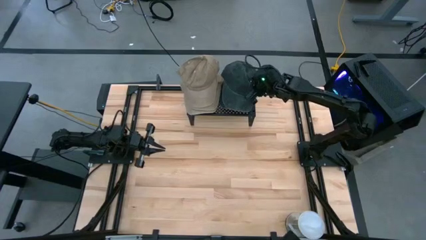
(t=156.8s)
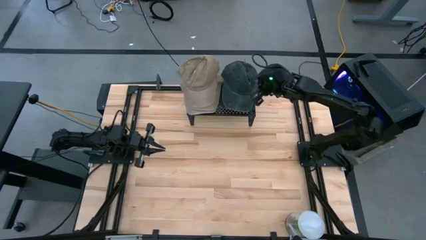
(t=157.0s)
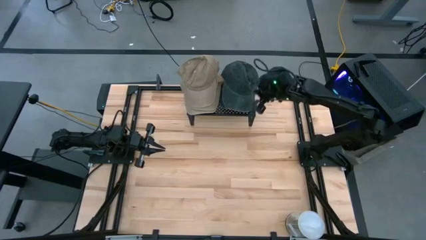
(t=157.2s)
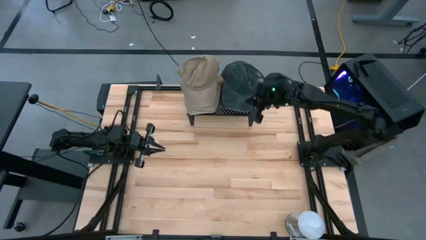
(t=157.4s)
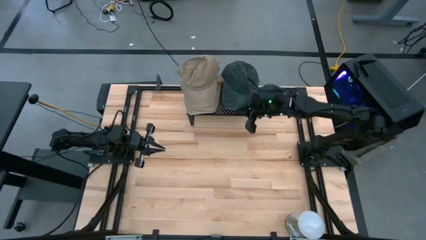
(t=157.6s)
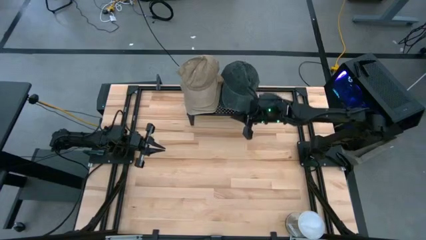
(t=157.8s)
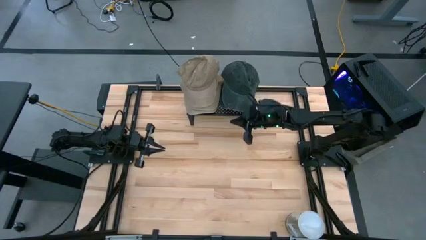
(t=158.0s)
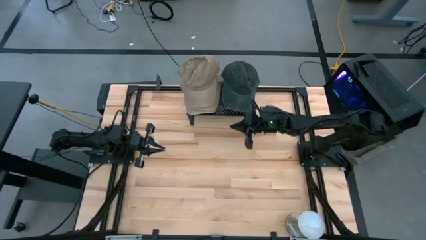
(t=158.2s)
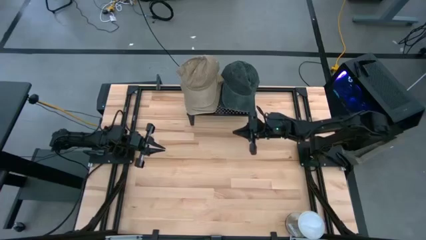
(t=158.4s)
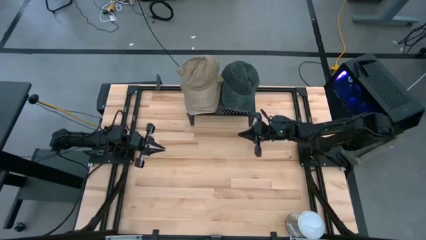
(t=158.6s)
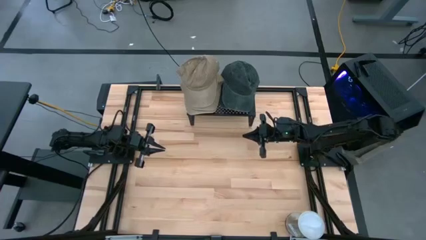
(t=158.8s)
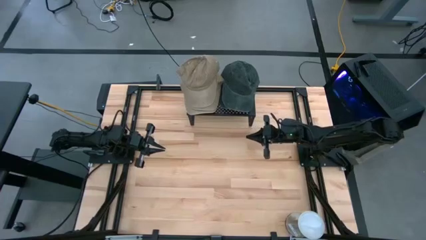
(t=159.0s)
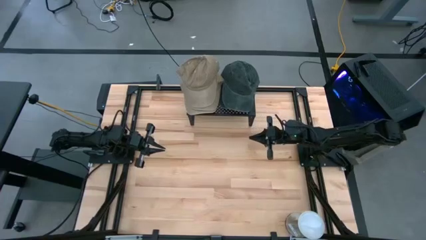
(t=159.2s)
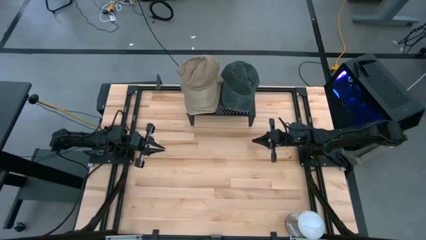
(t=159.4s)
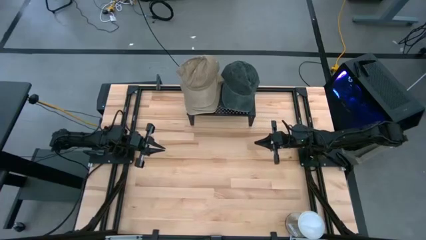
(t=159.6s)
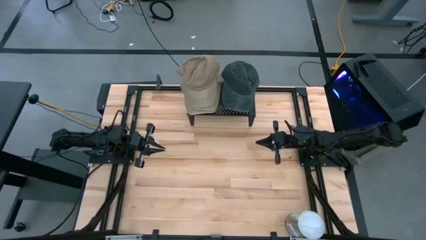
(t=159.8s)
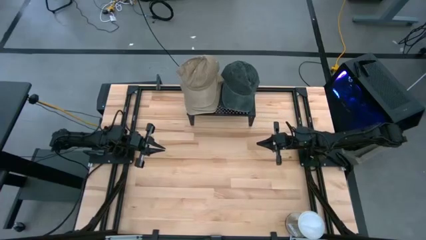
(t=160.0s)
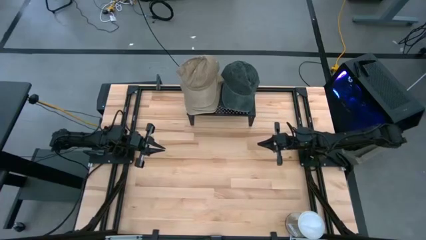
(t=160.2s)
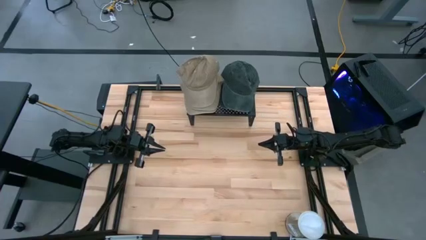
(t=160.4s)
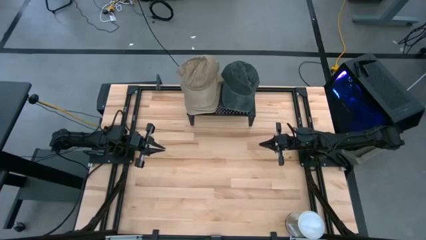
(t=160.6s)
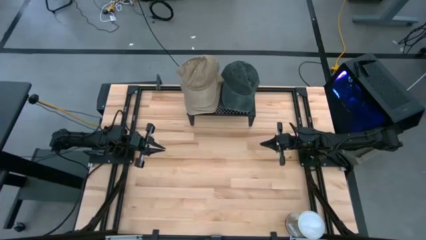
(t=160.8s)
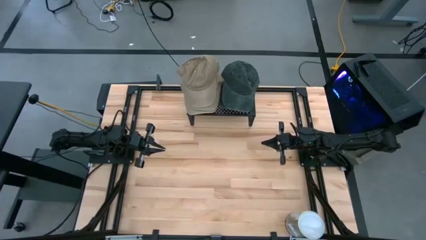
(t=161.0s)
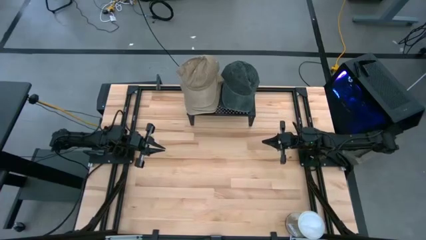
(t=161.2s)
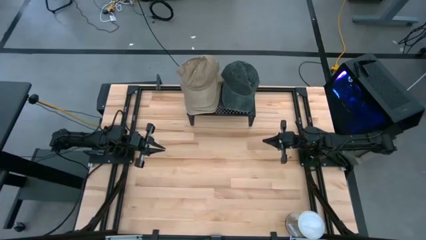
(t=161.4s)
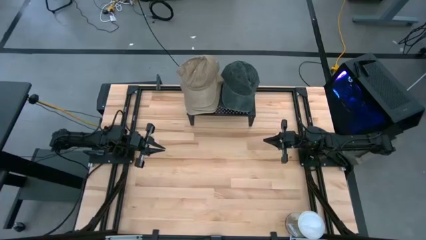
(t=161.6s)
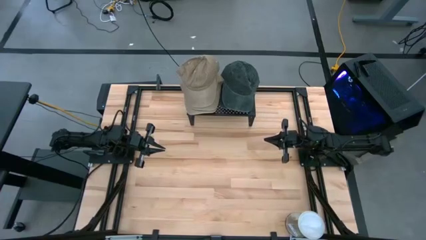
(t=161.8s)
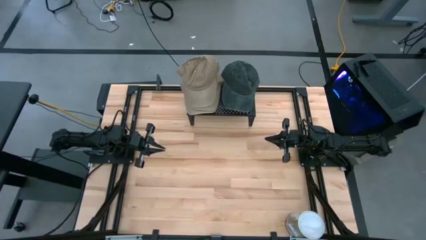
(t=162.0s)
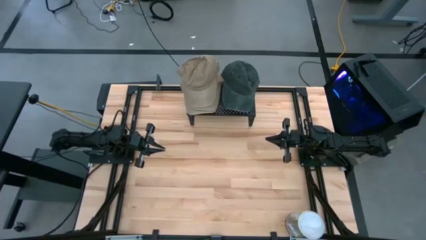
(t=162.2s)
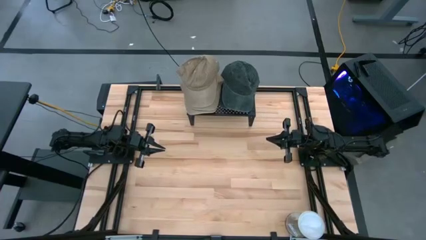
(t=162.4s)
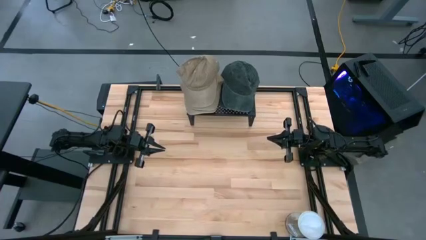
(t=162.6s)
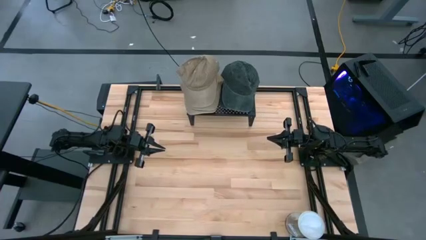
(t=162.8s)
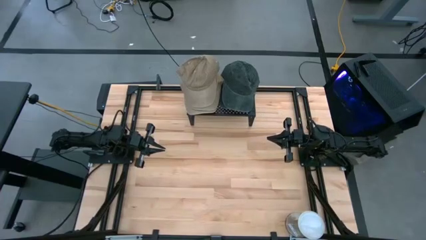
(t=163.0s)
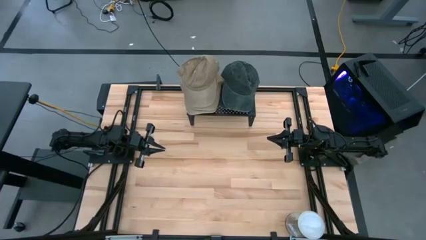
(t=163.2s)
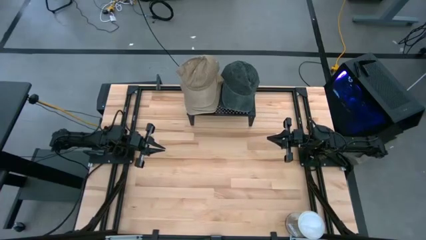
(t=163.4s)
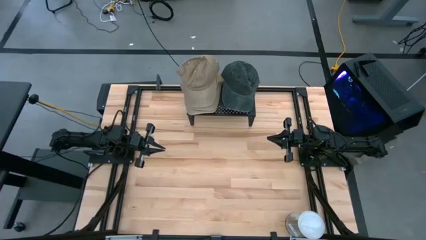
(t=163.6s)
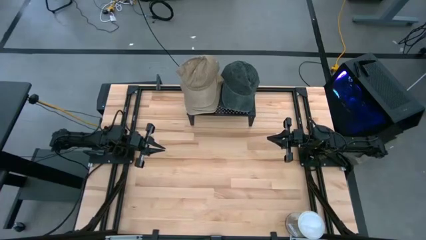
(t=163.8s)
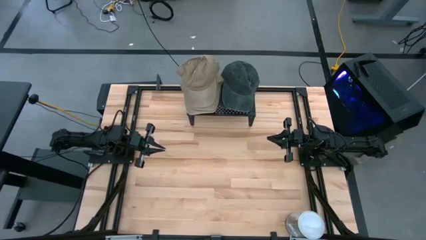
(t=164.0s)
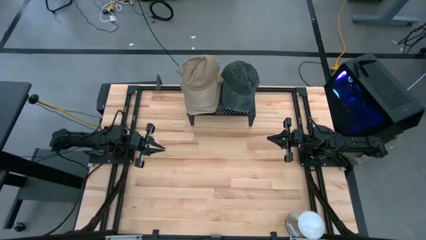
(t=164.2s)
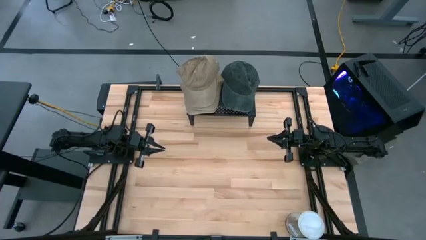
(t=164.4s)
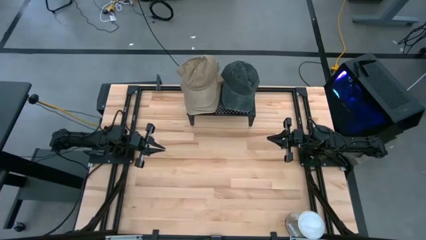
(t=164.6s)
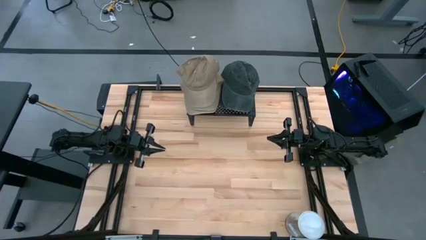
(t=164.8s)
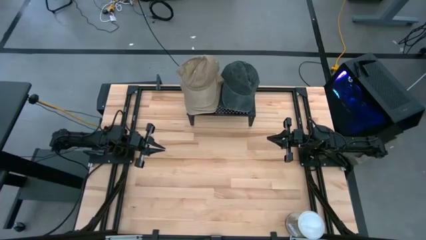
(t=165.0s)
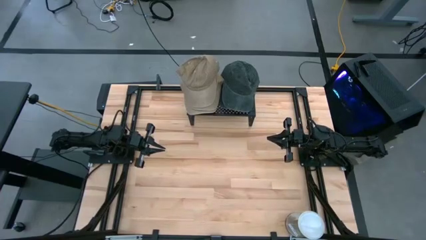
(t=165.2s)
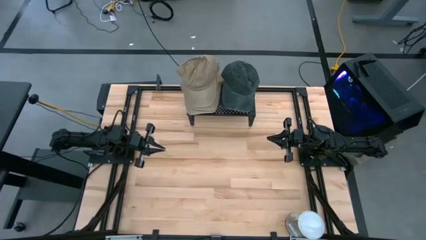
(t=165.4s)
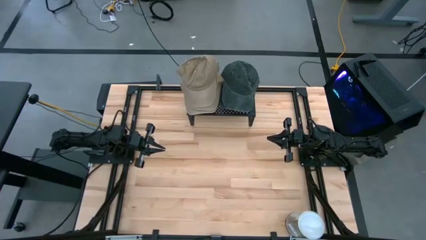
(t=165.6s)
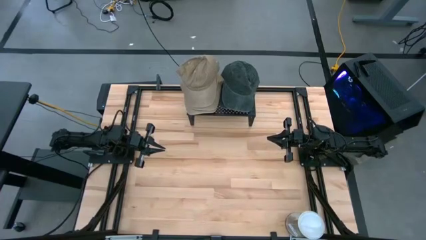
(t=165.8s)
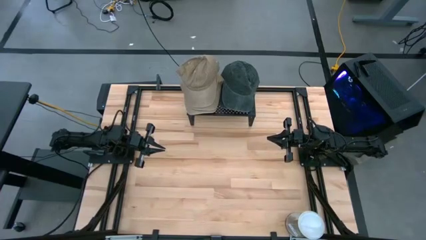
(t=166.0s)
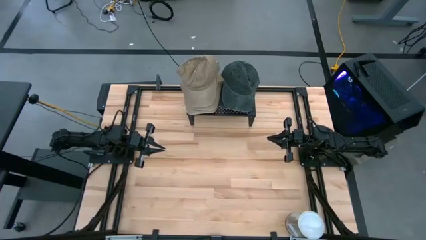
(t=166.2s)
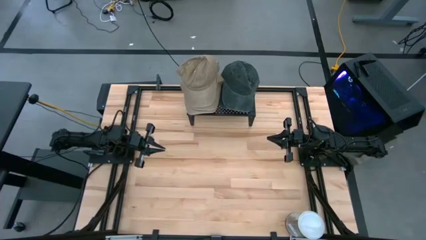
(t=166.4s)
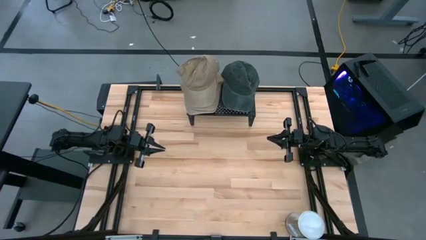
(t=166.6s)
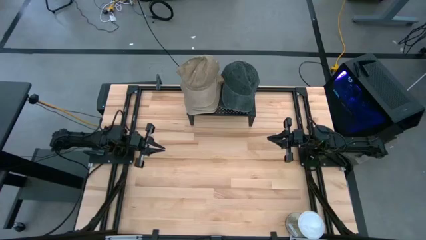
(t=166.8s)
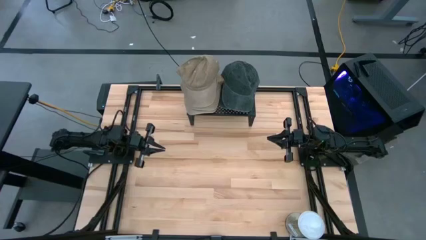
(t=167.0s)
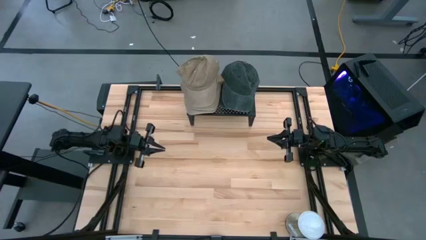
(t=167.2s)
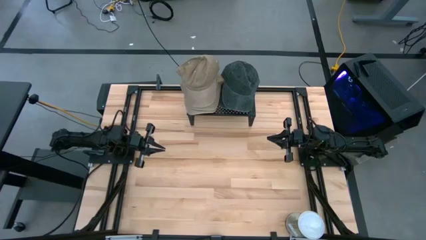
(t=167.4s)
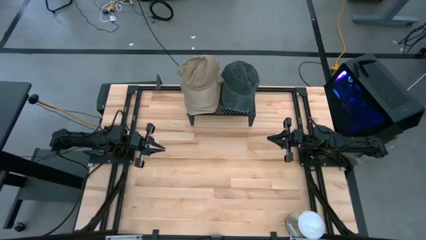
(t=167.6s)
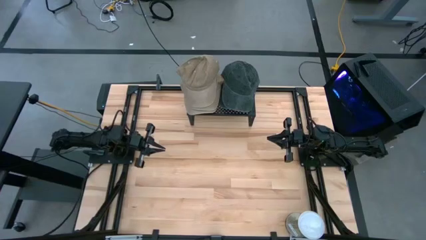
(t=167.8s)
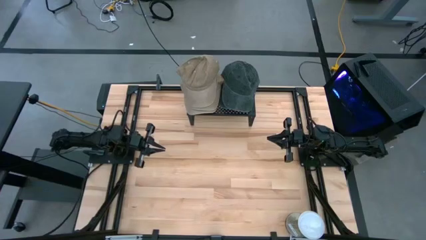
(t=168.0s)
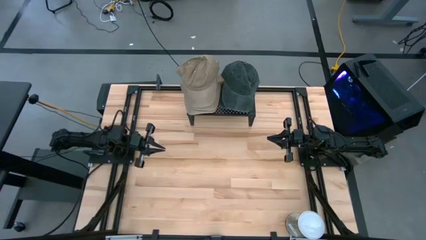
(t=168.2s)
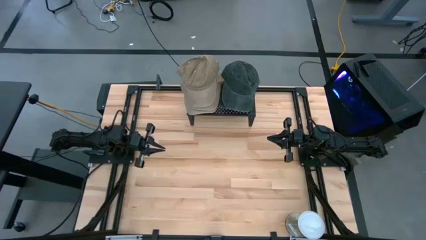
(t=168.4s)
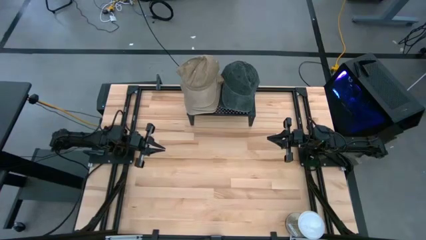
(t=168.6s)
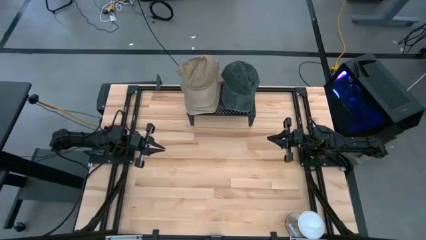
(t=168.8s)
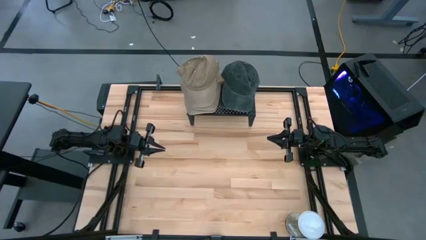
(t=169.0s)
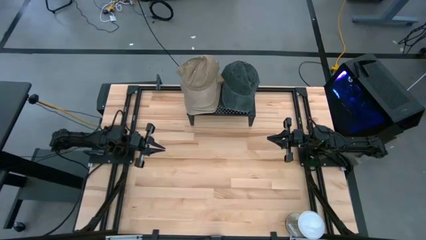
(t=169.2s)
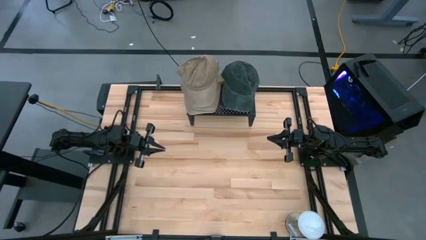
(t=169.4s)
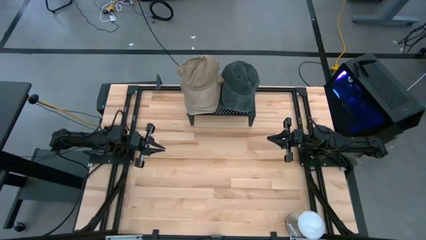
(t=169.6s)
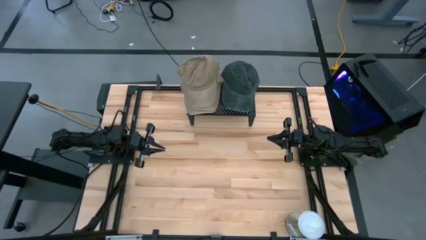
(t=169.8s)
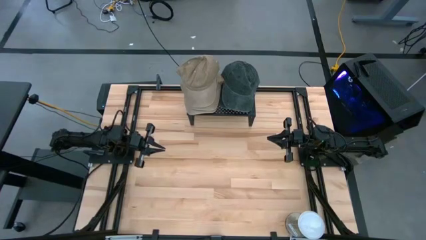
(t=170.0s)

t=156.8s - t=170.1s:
Task: Pick & Place hat
Return to Home Position

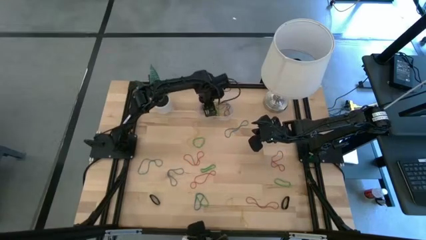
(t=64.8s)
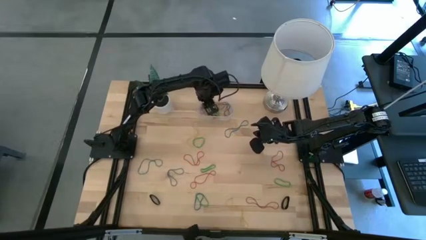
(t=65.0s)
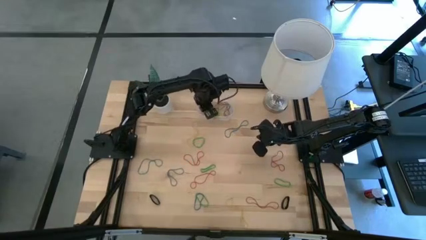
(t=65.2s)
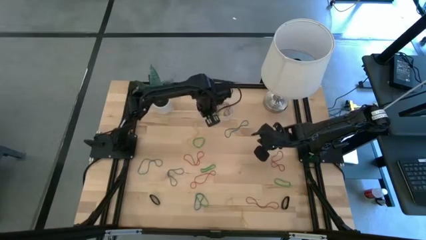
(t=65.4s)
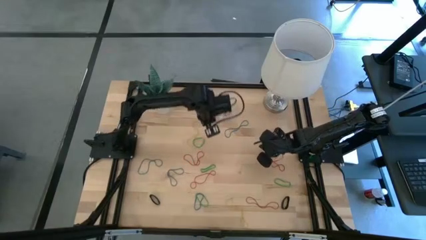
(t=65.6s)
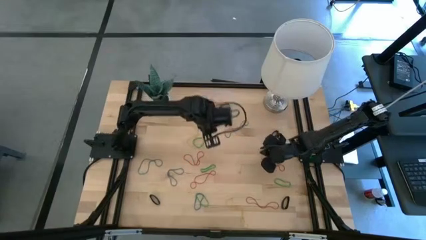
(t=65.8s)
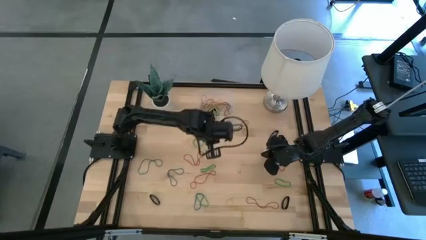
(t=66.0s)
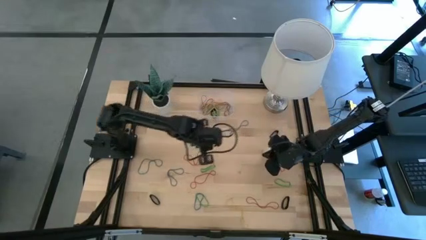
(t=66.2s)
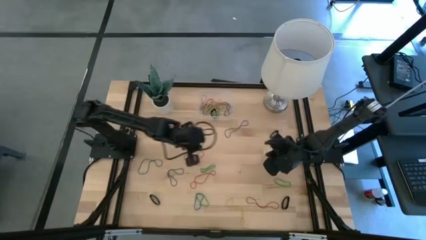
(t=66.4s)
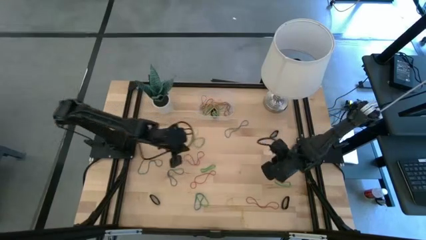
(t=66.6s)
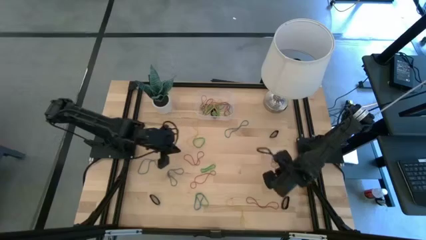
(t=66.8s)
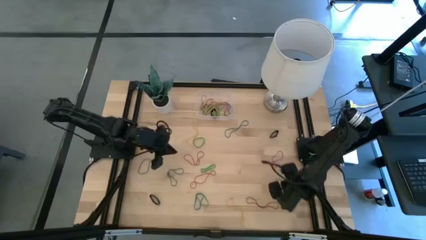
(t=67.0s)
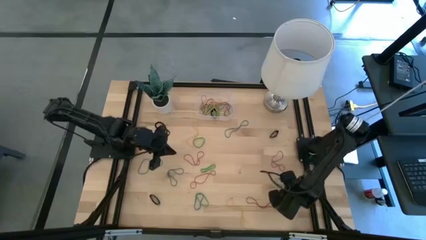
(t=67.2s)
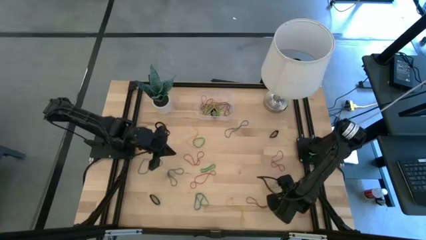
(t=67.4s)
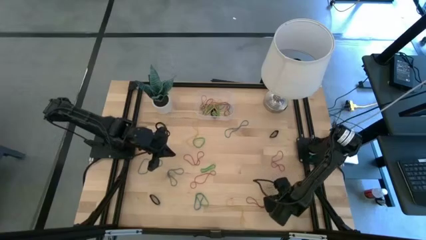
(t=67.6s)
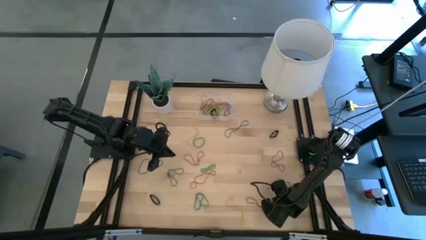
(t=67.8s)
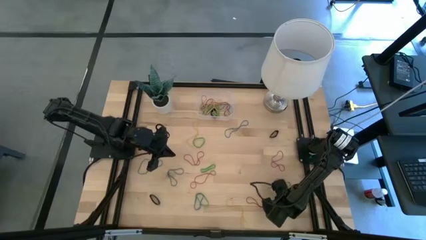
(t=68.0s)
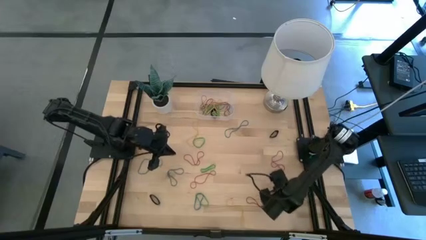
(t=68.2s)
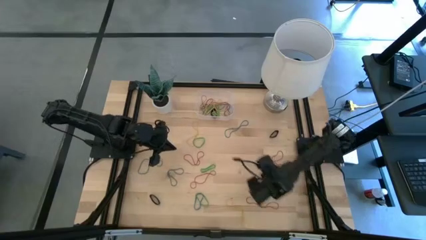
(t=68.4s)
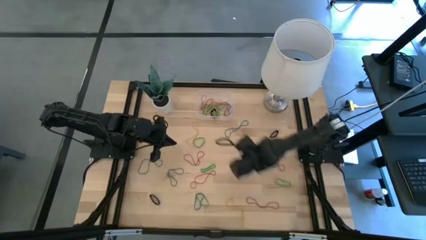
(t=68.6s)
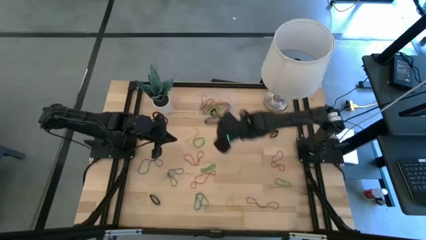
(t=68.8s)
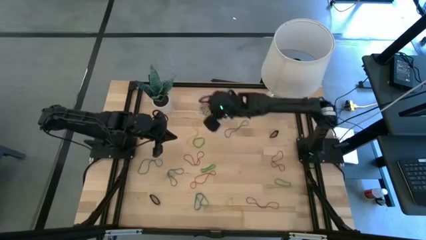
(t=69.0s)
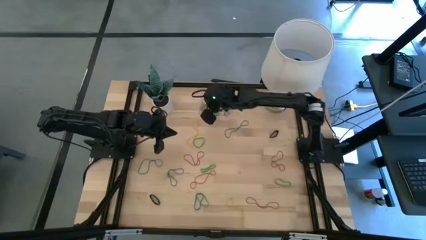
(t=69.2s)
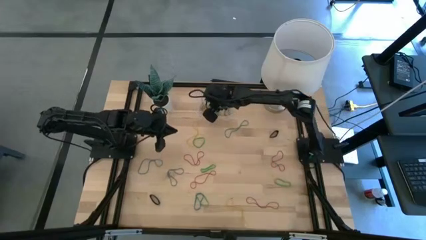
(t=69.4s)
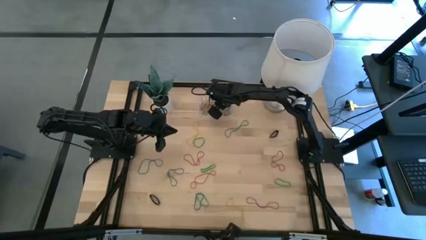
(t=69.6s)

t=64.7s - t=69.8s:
Task: Pick and place rubber bands into bin
Put the black rubber band into the transparent bin
